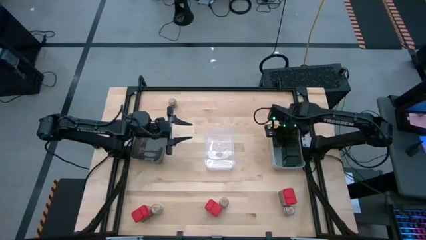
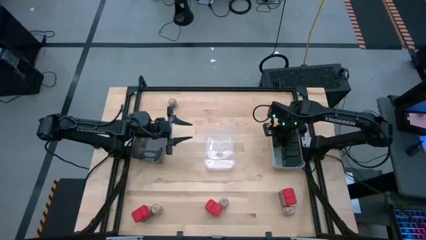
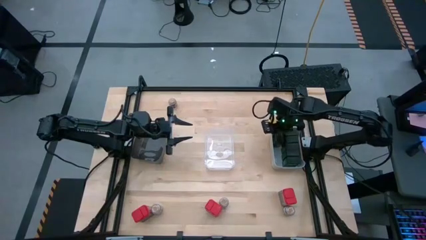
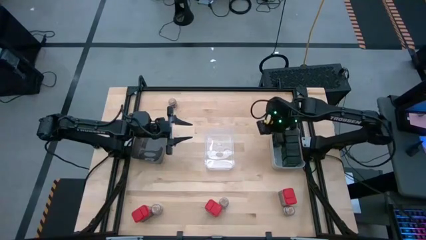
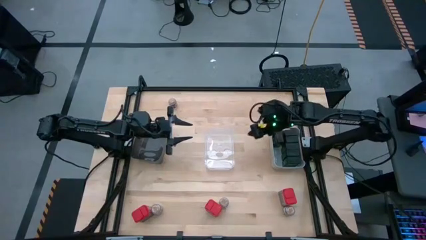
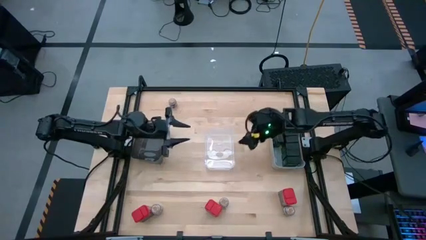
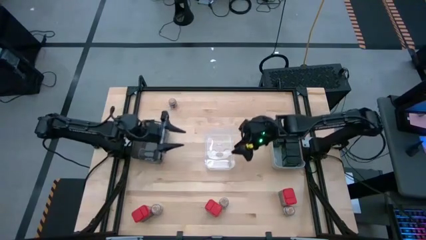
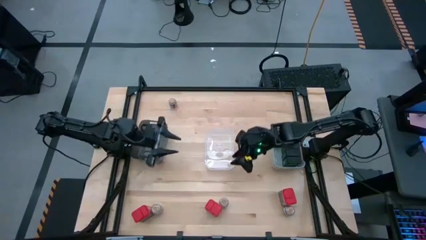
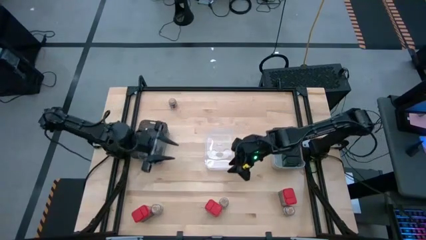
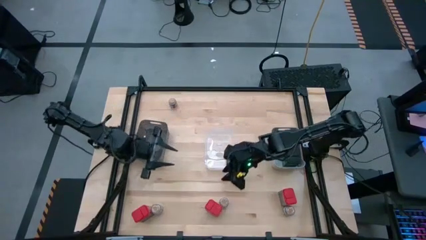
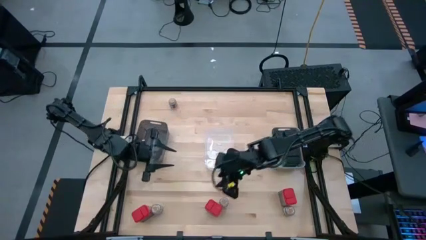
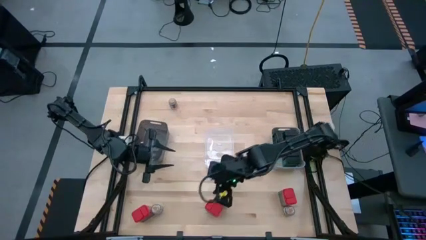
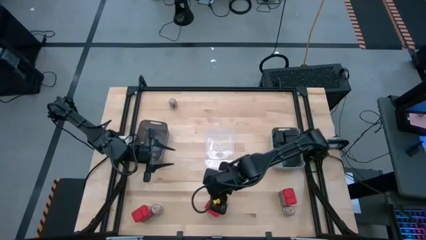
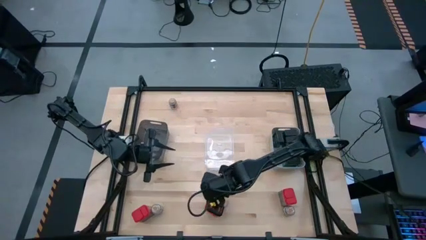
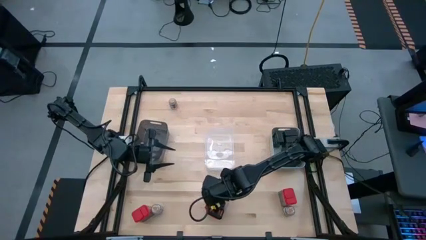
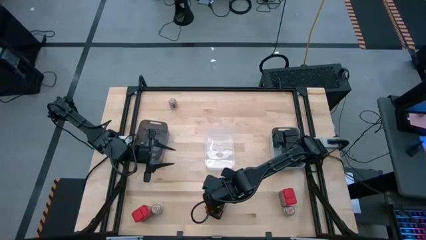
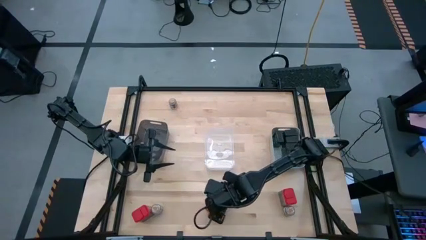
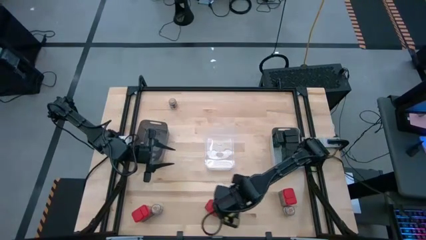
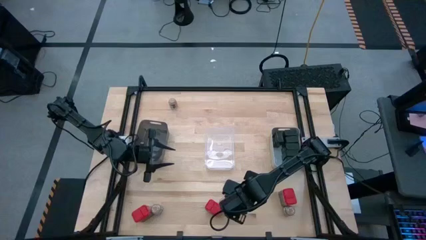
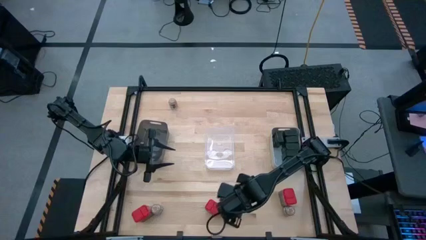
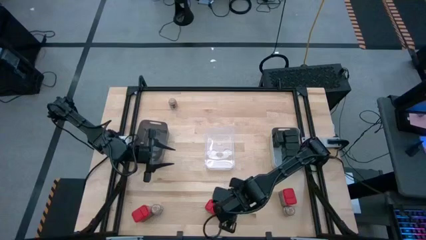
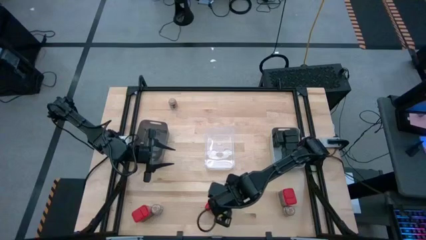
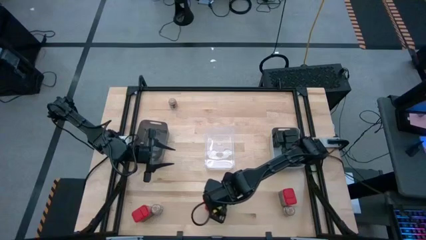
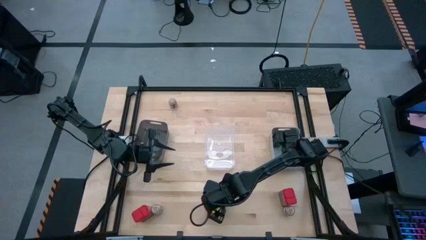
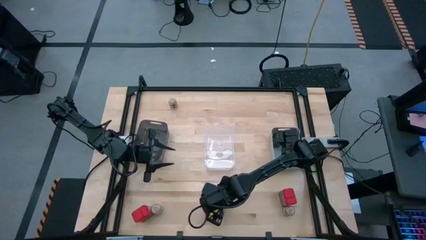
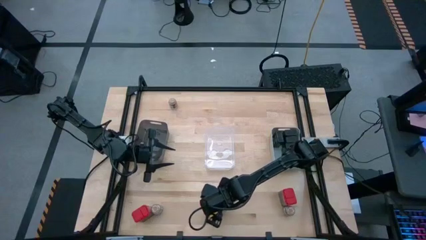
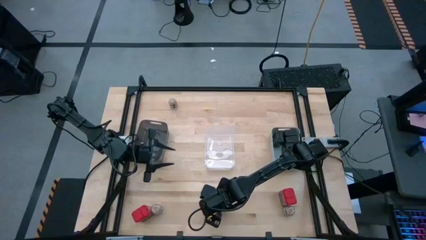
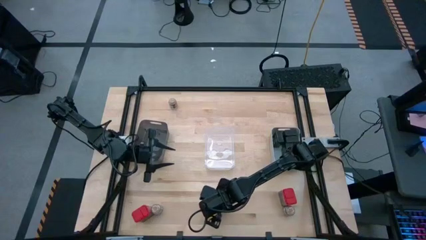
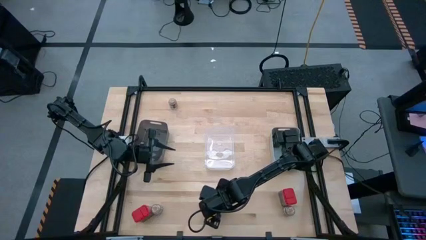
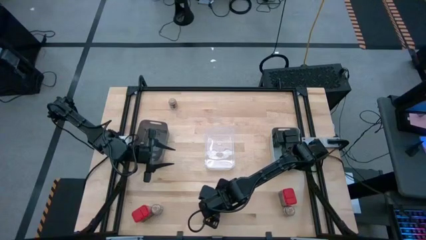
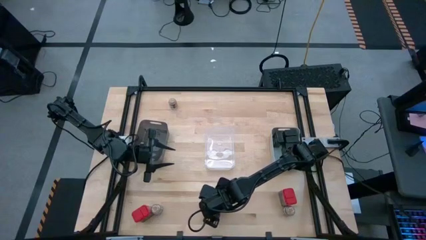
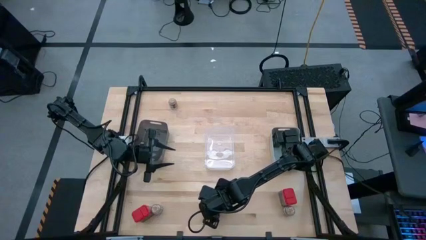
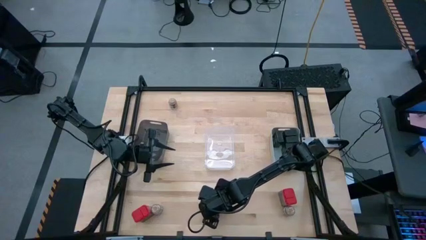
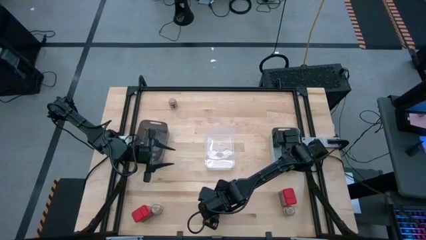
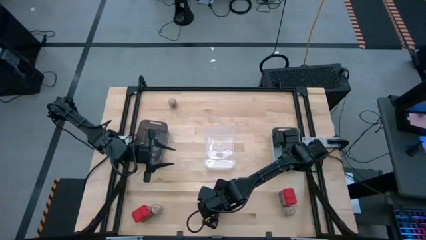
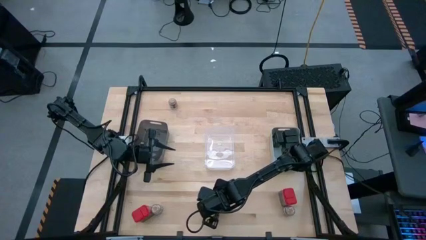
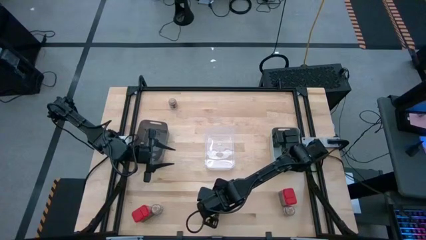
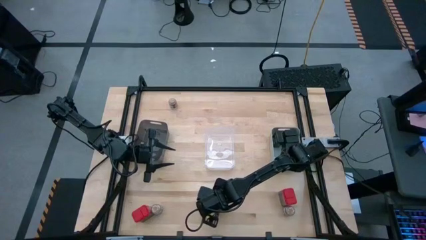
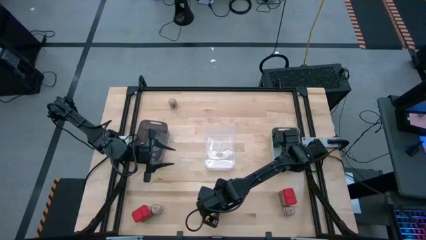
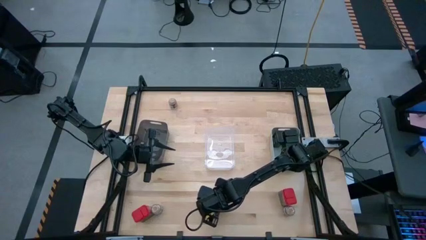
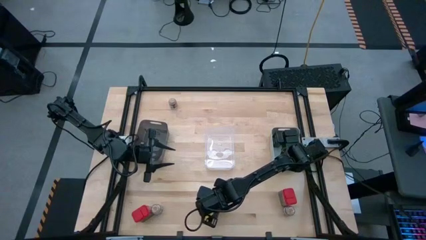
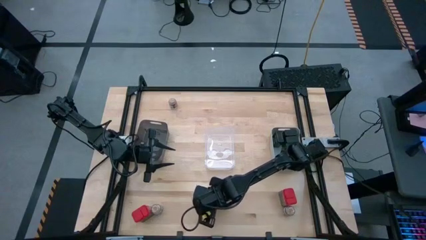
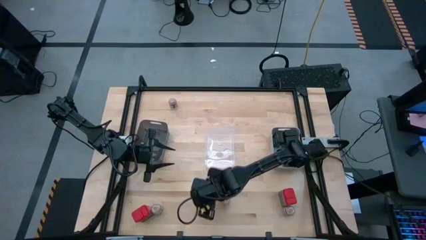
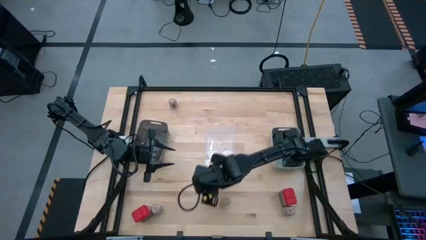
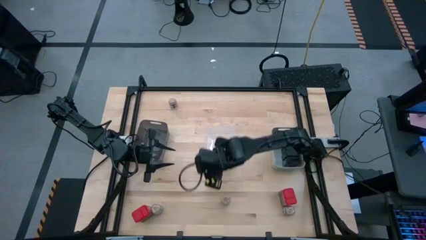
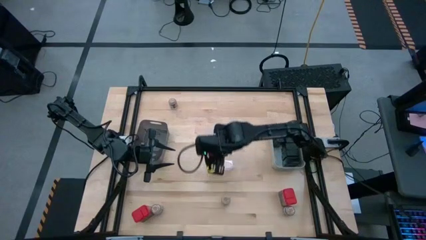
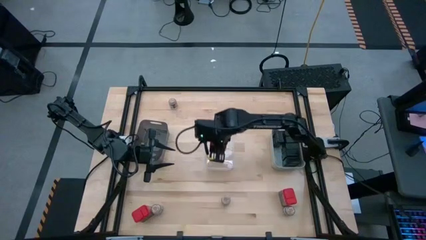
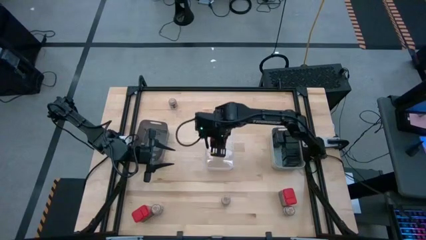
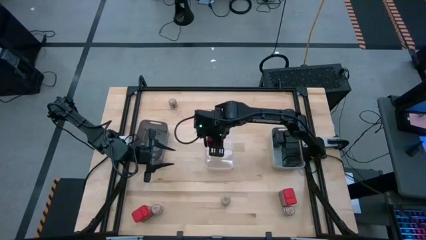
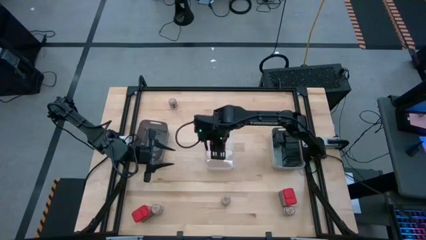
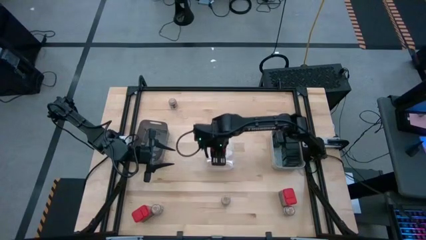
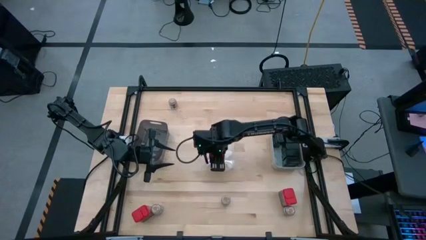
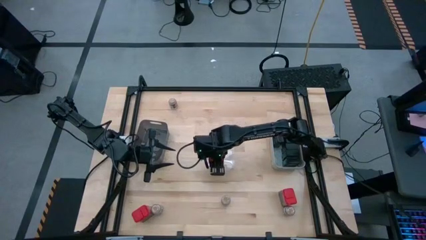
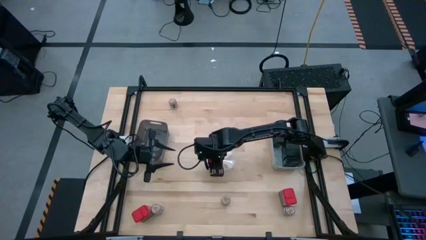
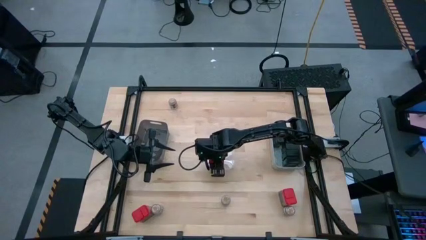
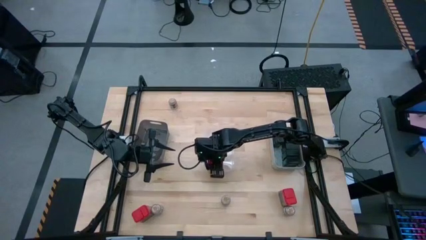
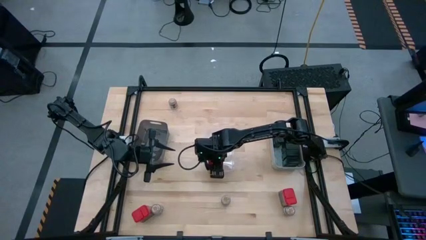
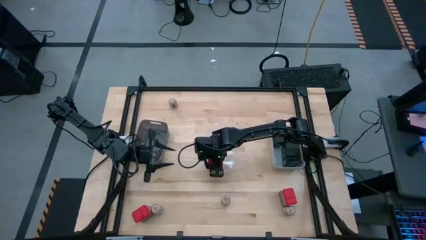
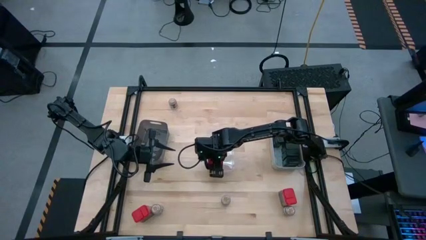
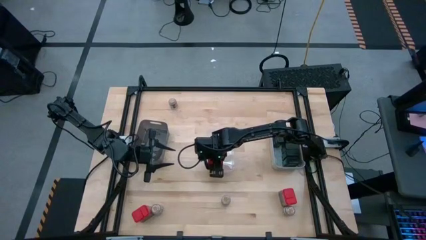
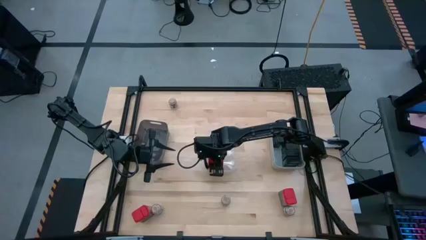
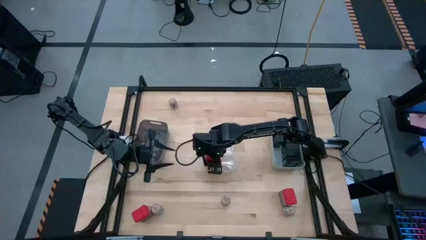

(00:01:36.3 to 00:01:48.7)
Task: Sort spices by type
Put the red seasoning can into the transparent bin
